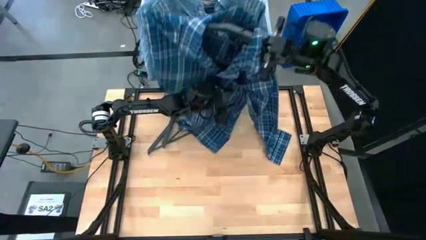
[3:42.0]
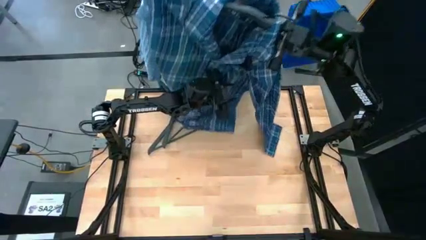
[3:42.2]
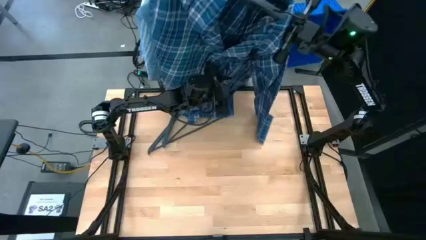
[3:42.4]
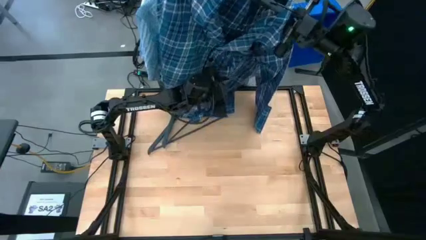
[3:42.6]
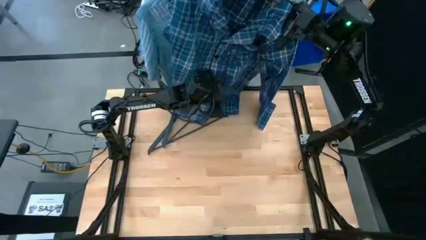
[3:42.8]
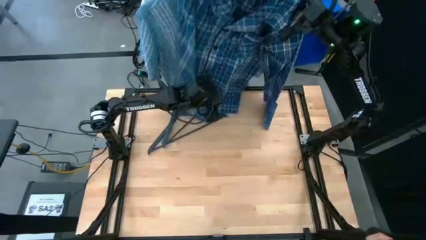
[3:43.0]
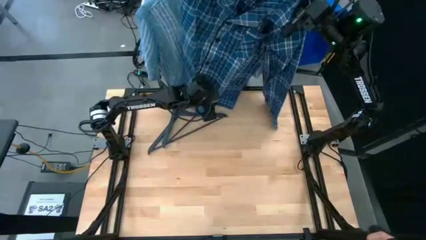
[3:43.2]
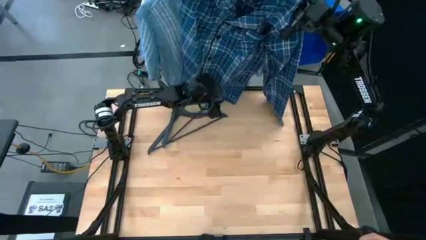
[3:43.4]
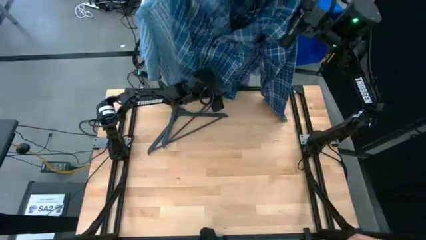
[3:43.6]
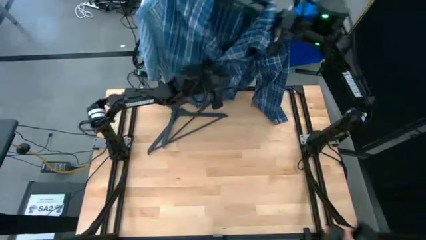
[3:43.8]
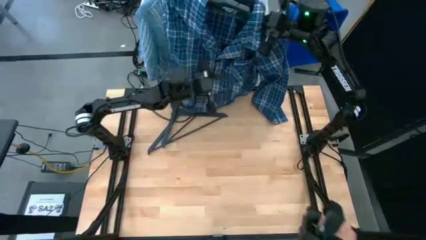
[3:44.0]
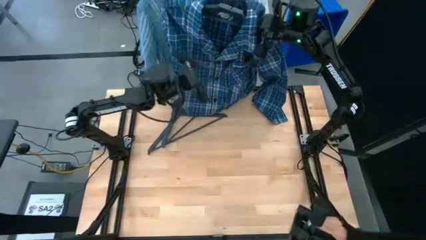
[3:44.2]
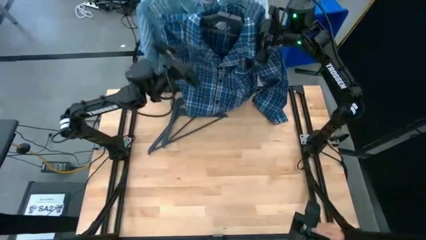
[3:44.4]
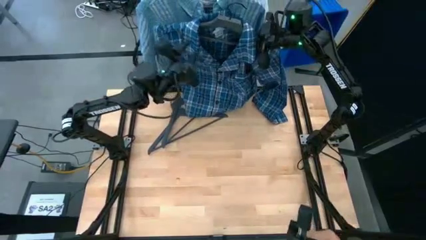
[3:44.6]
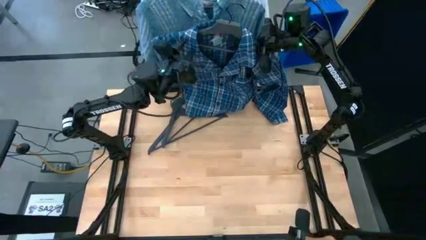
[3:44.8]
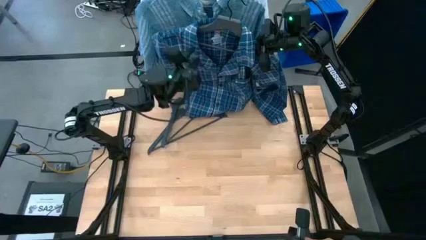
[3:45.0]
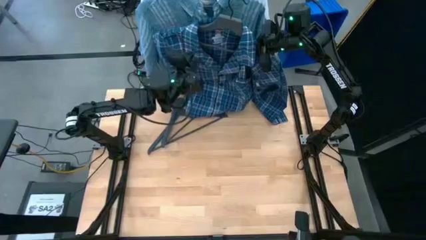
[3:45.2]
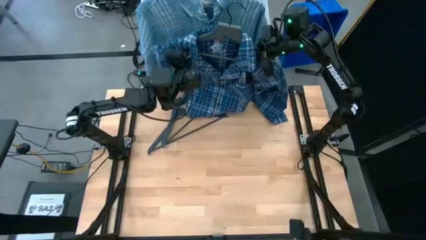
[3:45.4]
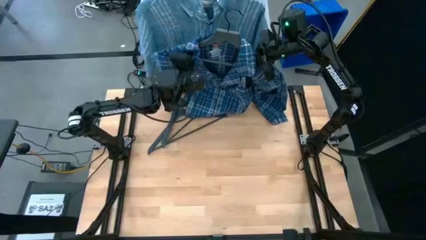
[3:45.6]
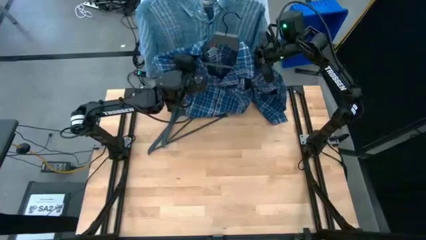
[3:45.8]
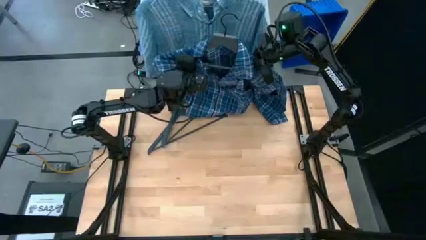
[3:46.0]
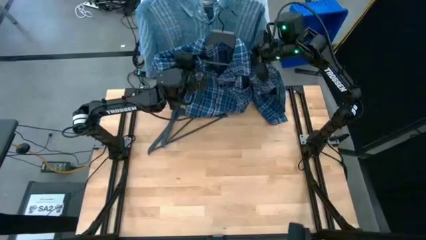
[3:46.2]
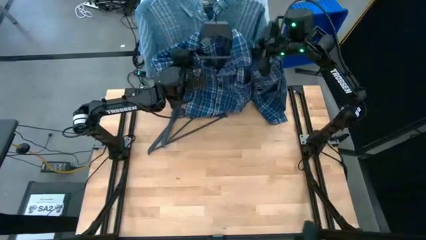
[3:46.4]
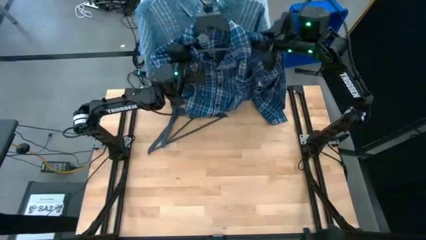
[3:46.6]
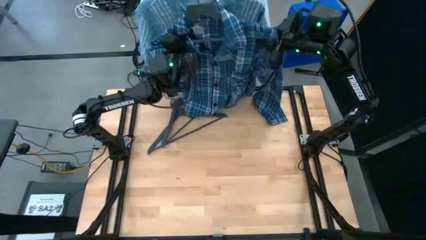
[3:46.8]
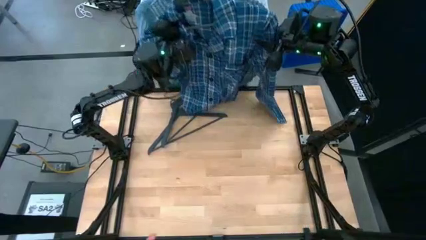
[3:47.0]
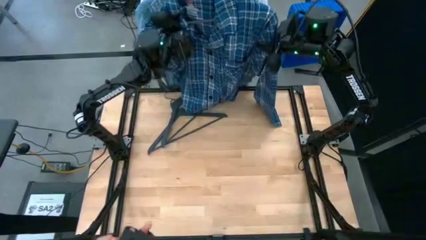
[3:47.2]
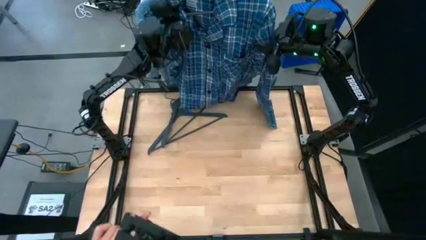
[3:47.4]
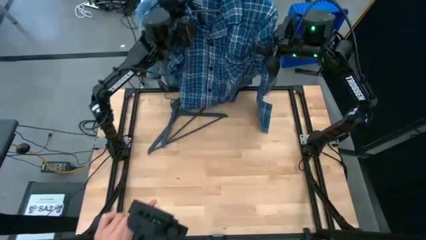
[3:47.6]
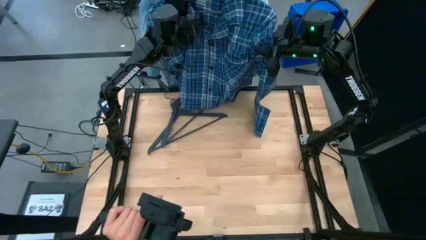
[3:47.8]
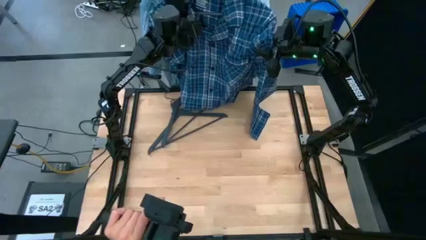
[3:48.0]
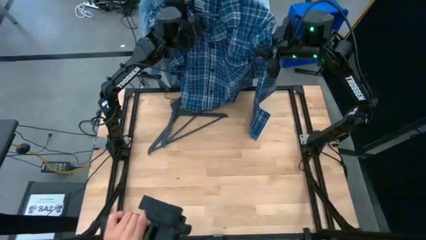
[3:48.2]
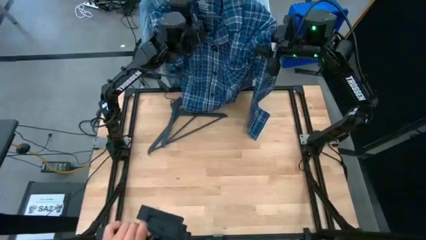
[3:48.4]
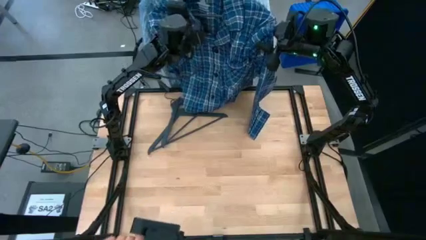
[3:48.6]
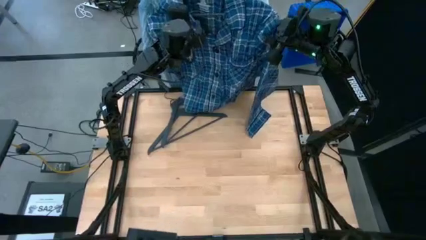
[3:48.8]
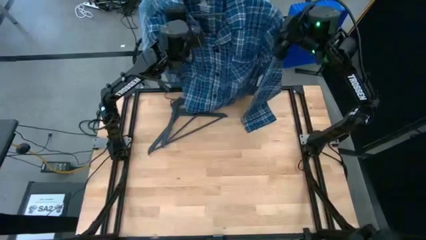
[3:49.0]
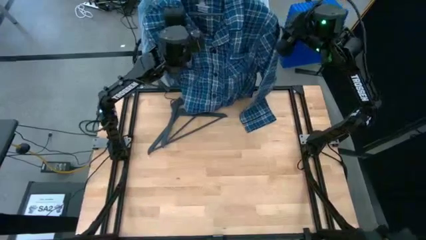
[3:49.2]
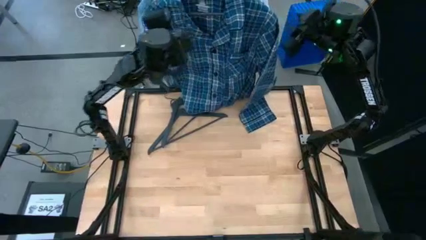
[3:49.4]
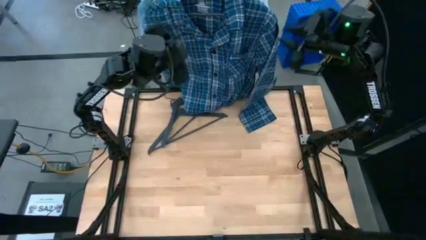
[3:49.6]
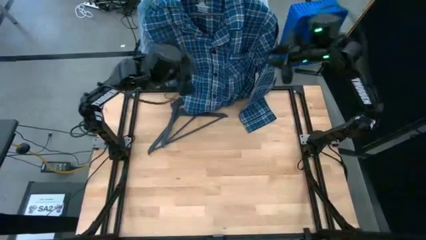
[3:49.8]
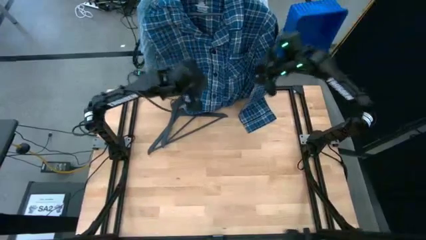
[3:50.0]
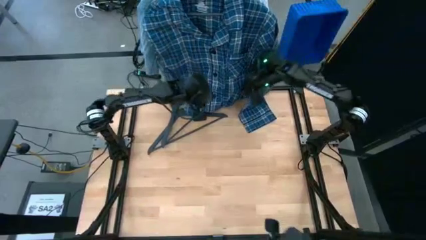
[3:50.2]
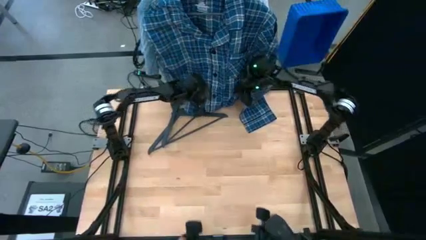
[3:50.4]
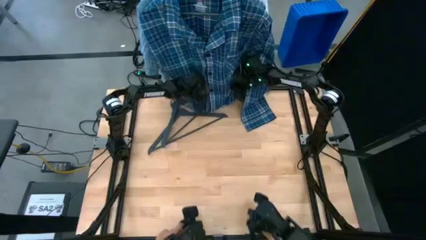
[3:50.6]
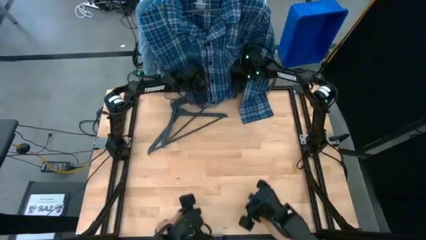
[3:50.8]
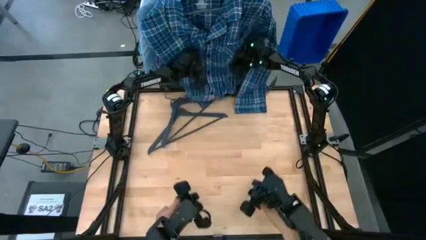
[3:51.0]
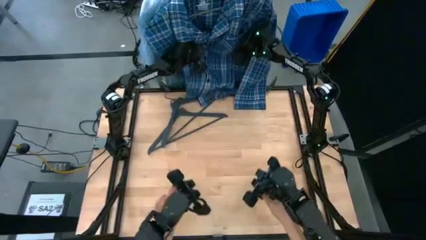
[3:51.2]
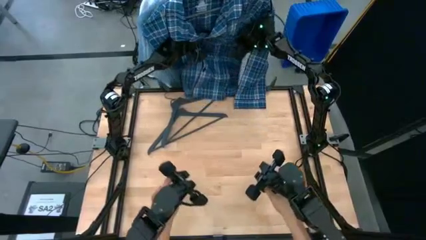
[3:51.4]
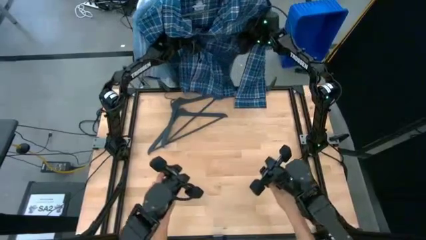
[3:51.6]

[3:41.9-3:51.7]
Task: Hang clothes
Hang the blue shirt on the hanging rack

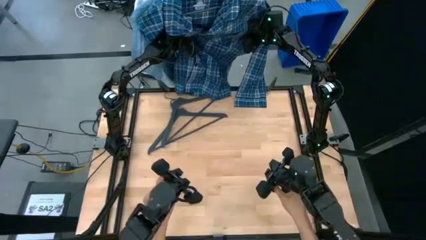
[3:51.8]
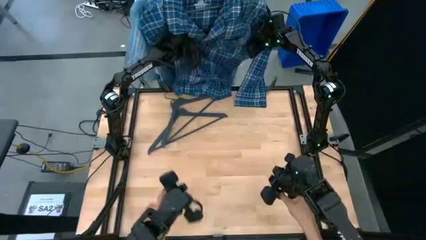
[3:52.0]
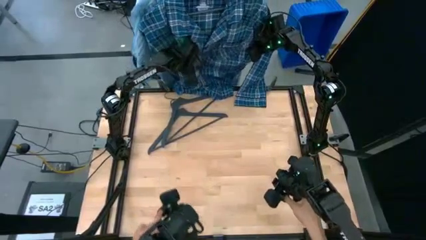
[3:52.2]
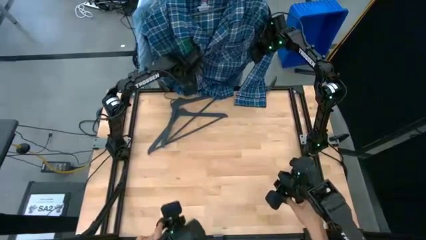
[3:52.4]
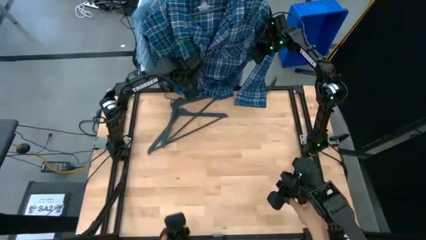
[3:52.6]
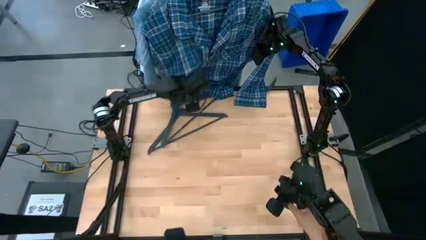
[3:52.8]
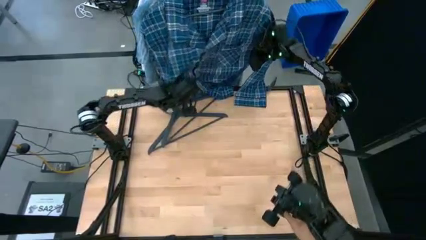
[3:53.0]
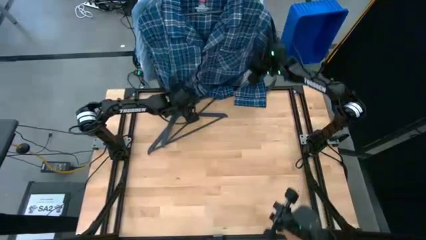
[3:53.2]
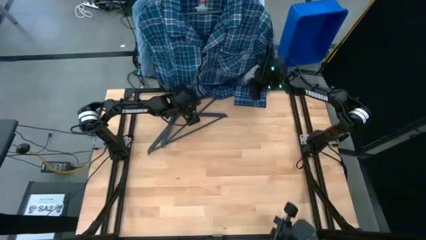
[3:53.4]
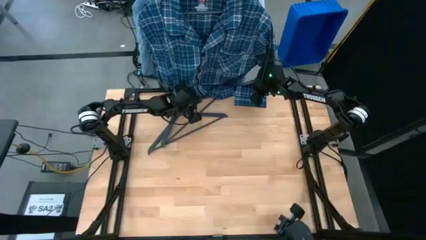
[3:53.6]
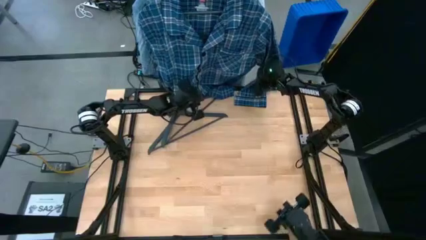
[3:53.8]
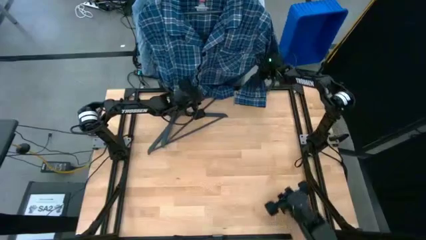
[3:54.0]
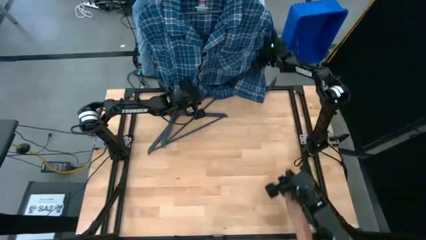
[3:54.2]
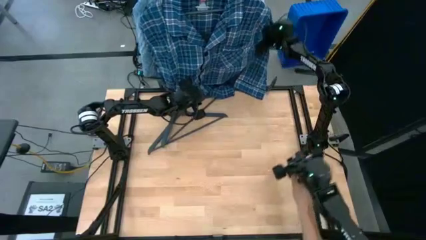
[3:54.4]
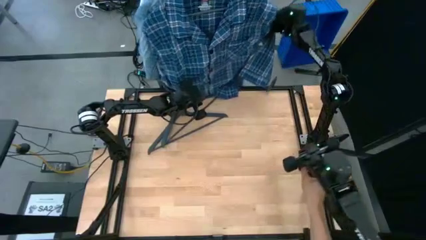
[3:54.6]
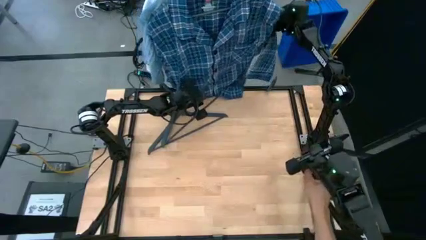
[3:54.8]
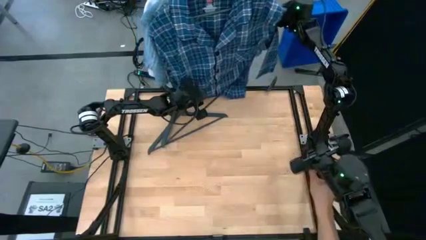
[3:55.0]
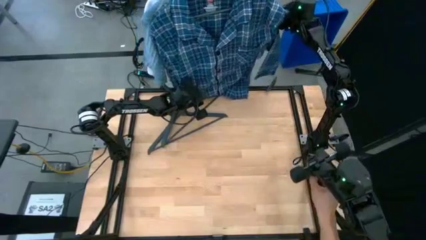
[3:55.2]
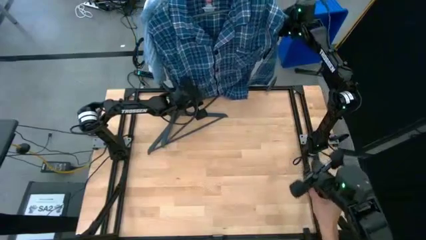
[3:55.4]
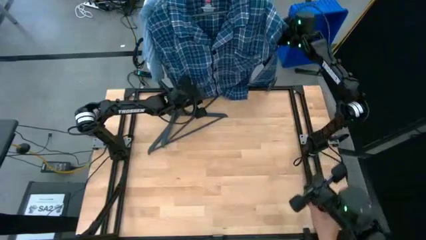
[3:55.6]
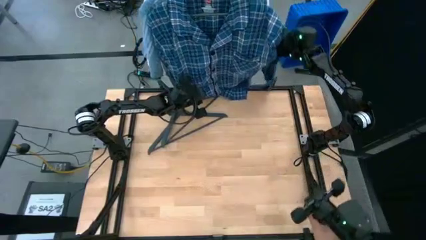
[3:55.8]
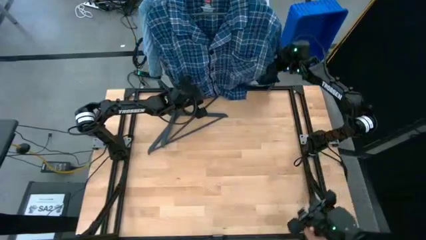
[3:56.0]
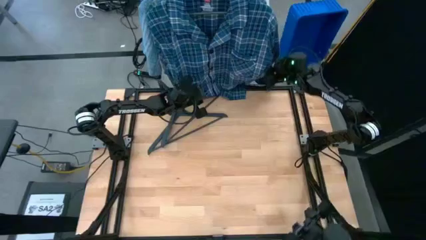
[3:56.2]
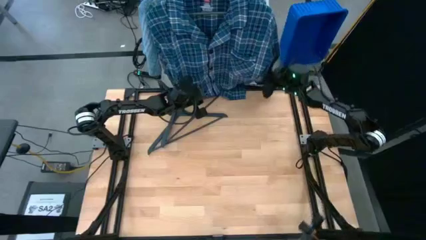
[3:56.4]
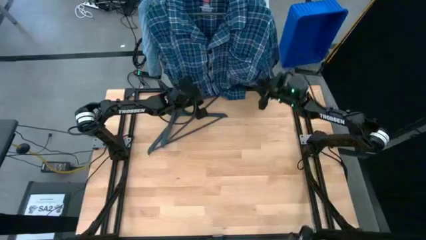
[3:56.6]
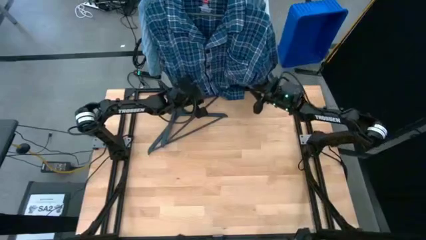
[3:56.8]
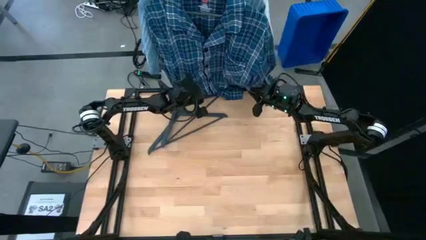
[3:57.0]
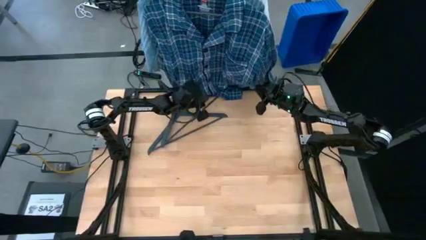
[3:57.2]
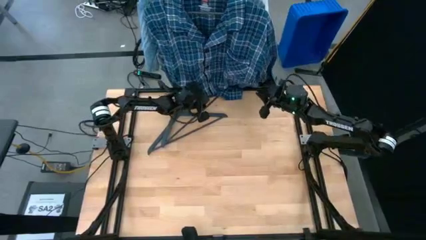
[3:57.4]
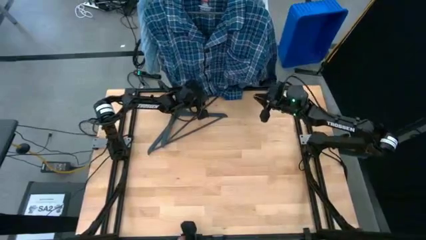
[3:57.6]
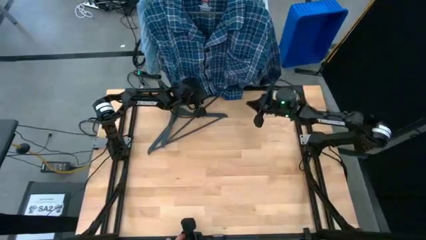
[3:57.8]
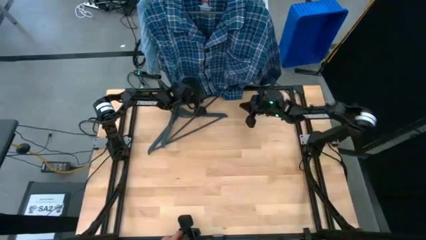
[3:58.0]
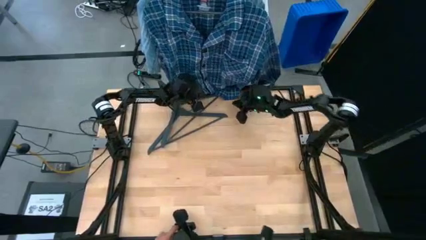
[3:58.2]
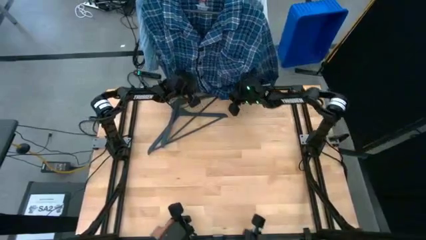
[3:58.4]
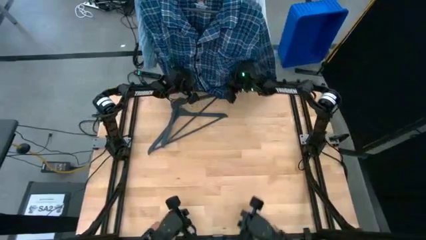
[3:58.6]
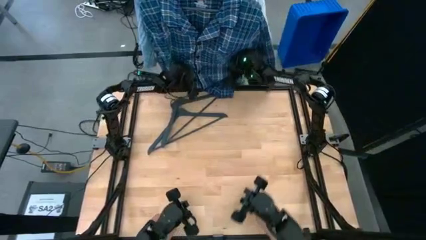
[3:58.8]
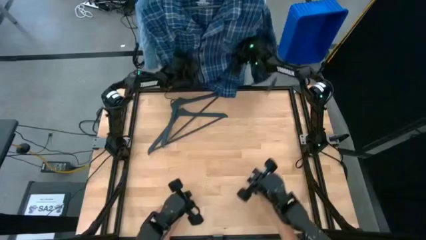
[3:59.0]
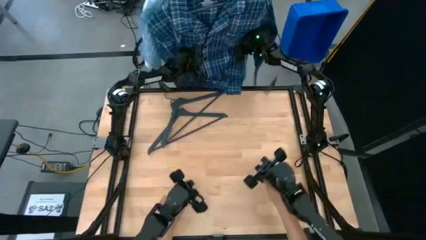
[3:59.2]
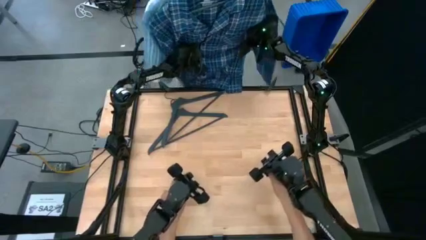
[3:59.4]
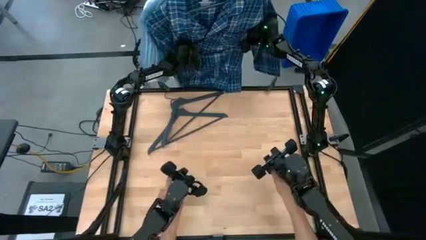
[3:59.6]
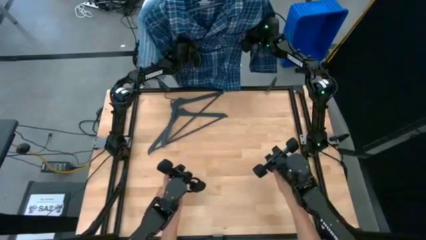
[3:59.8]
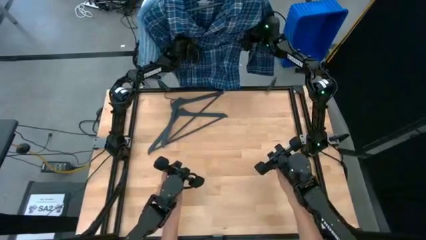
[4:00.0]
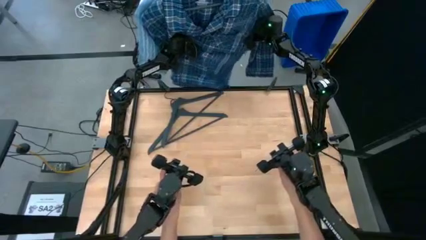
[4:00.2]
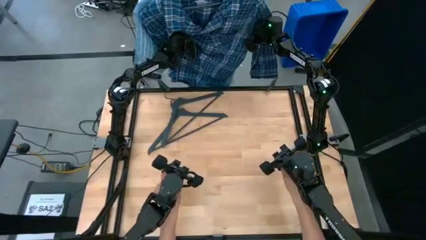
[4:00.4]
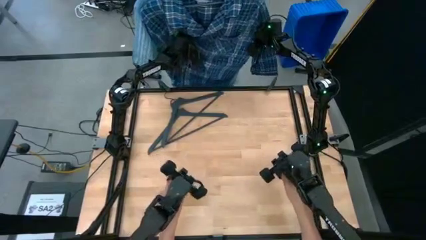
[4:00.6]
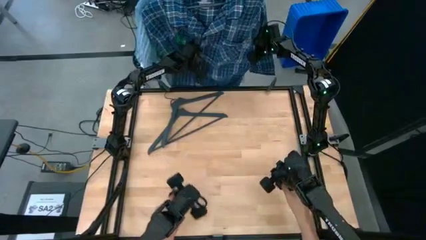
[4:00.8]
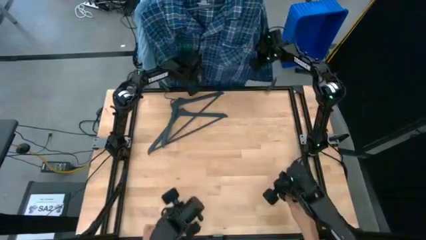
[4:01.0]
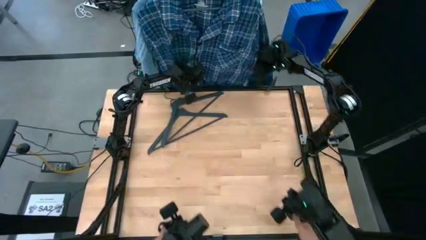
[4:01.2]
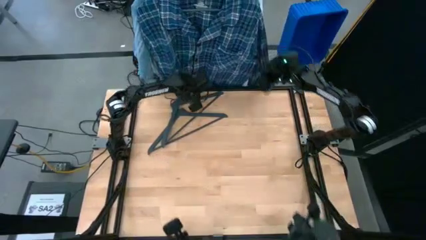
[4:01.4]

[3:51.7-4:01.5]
Hang the blue shirt on the hanging rack
